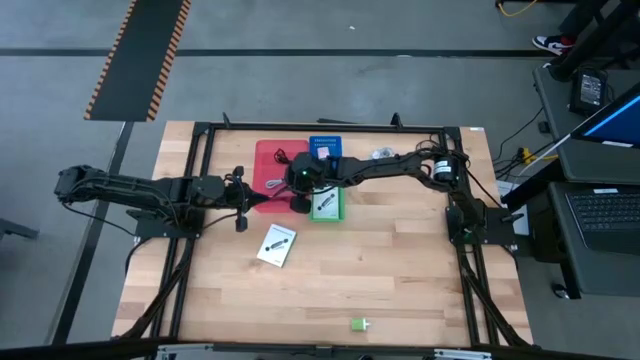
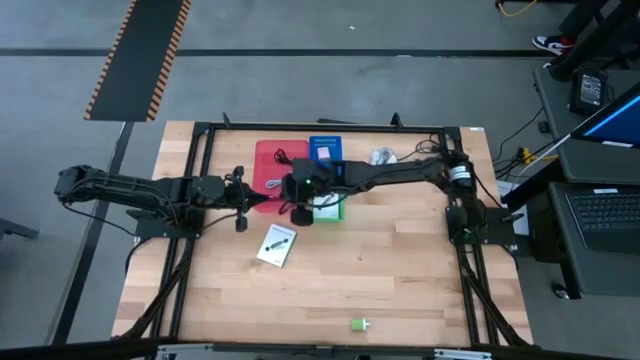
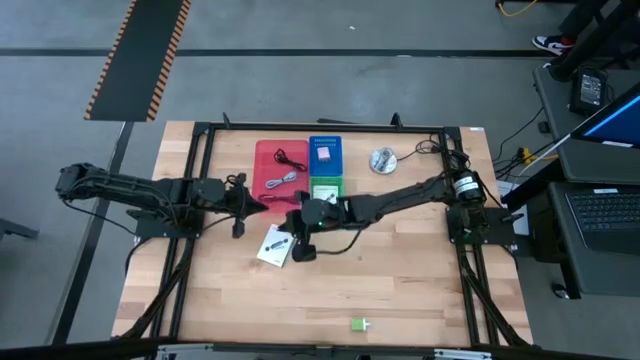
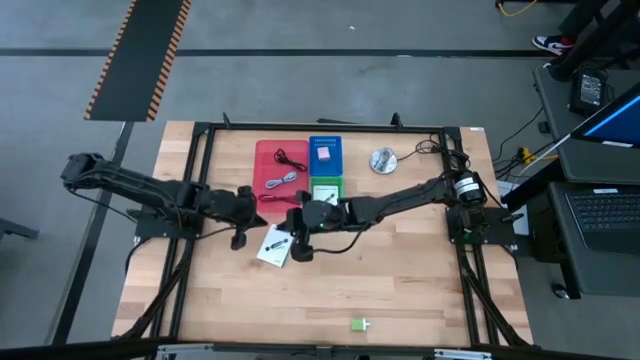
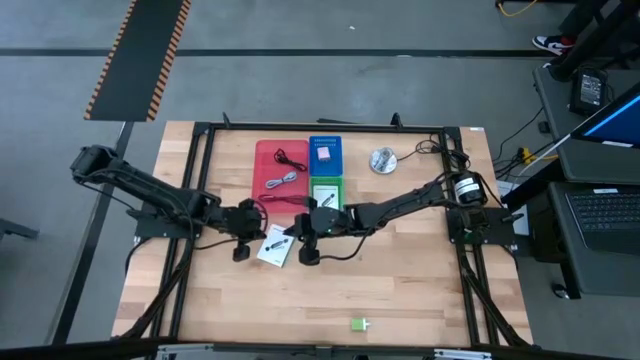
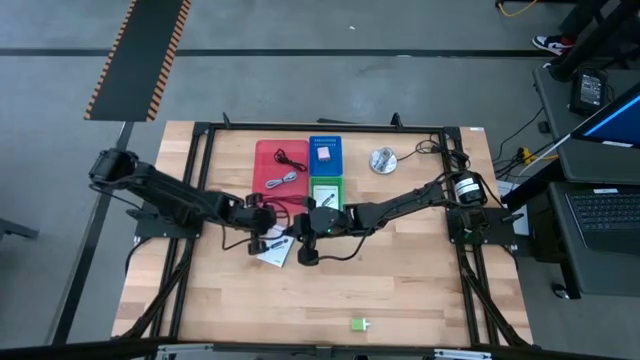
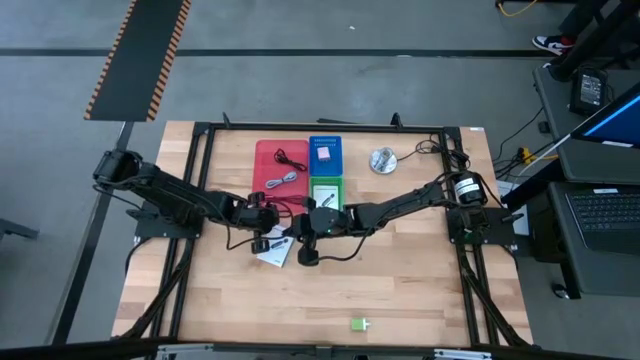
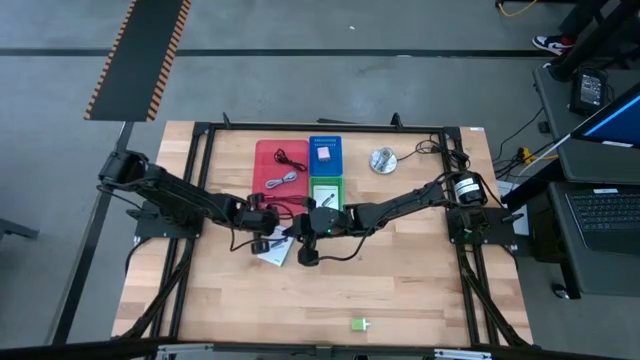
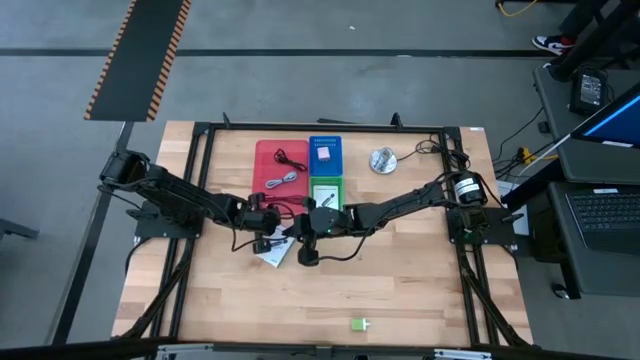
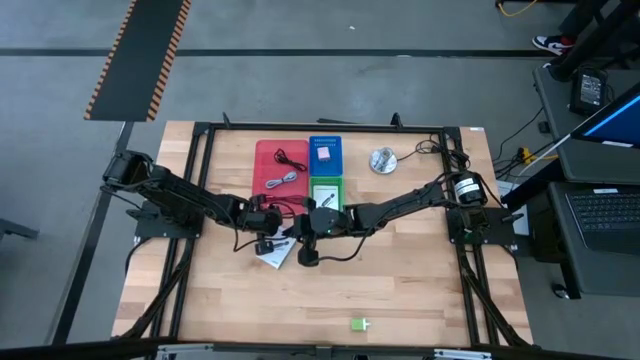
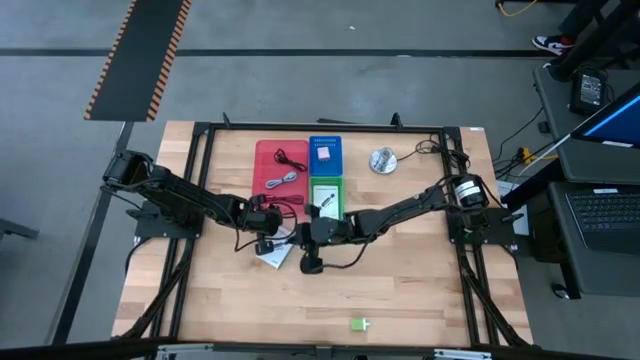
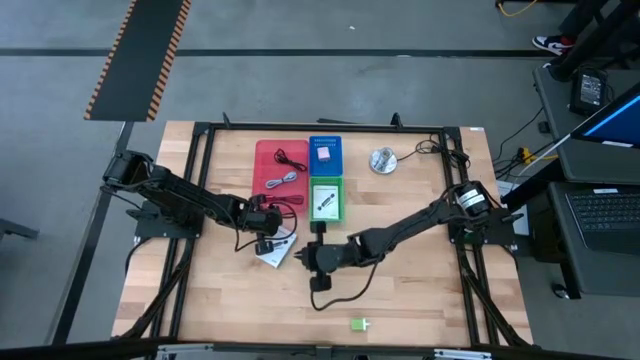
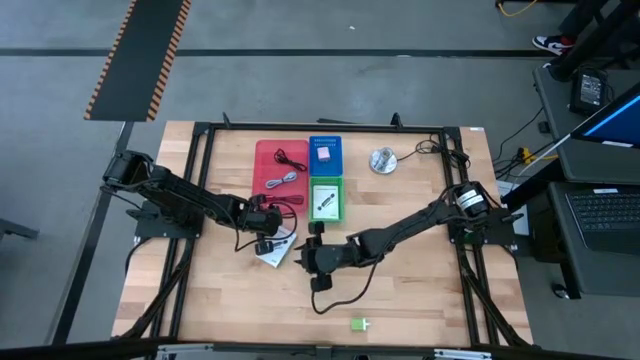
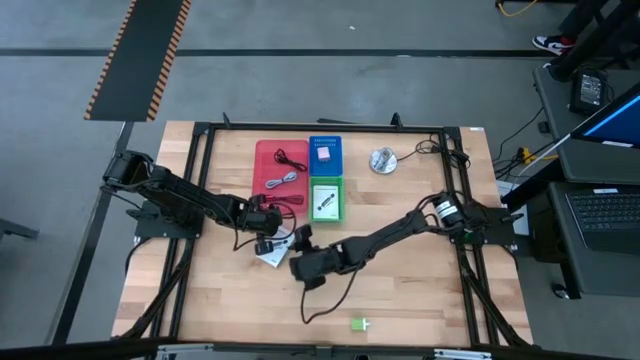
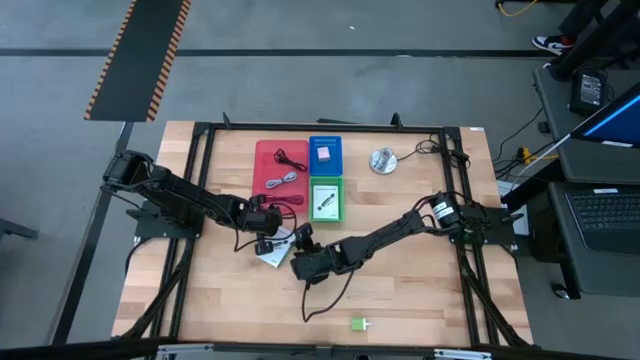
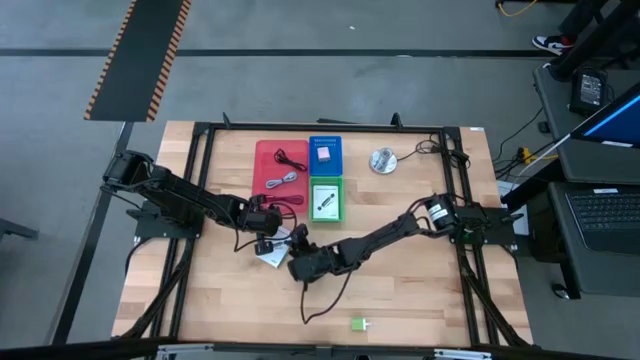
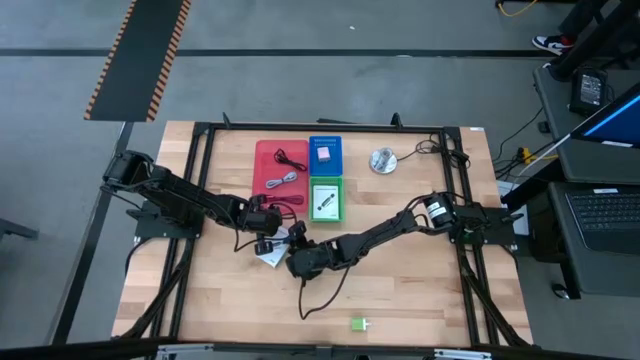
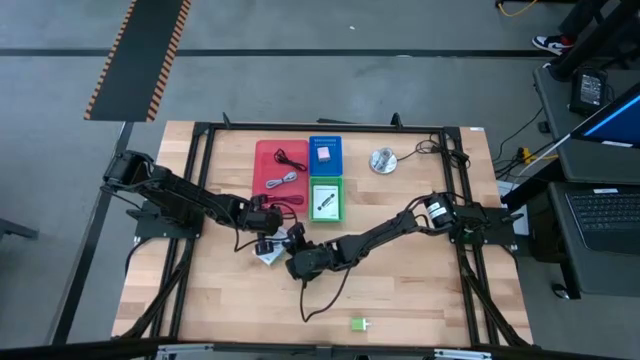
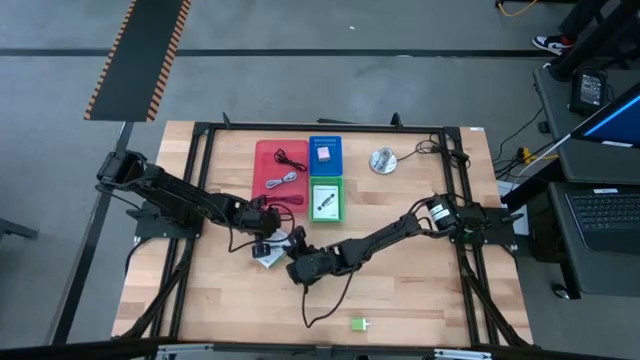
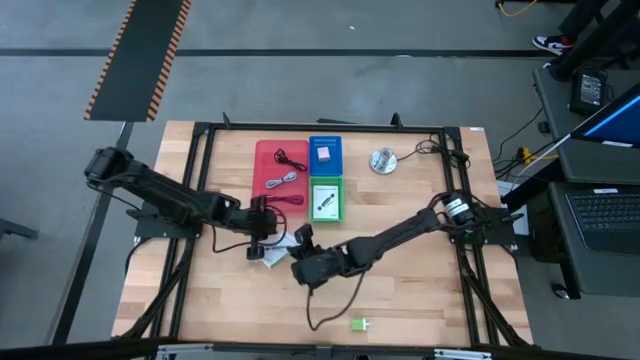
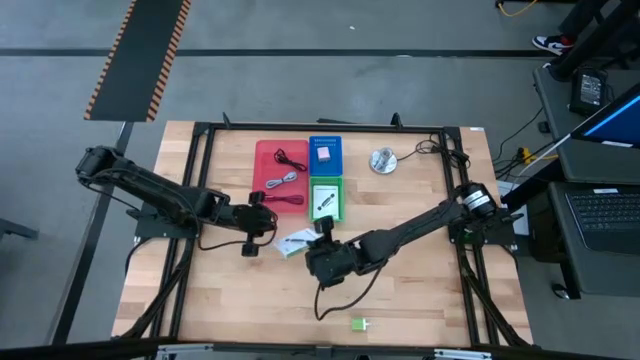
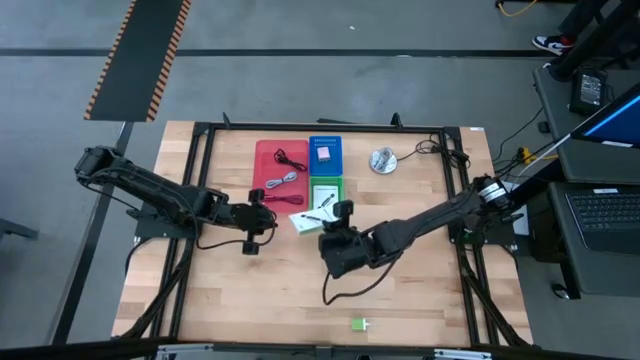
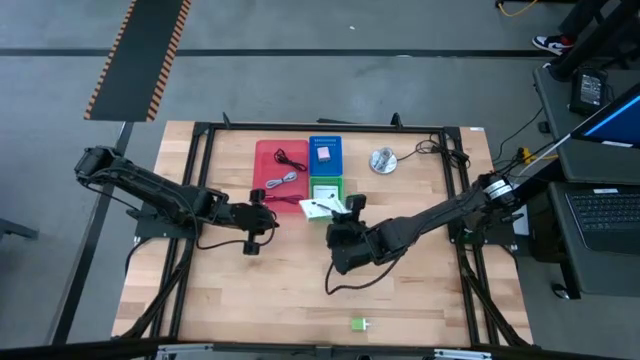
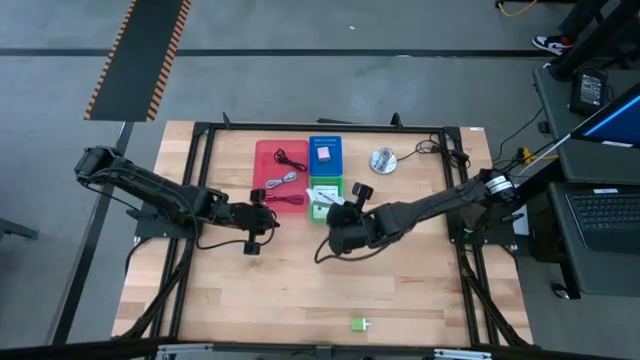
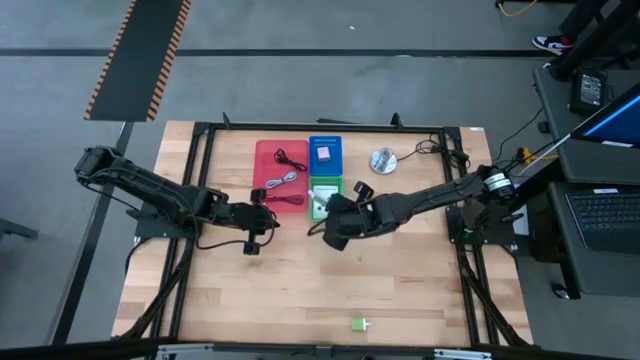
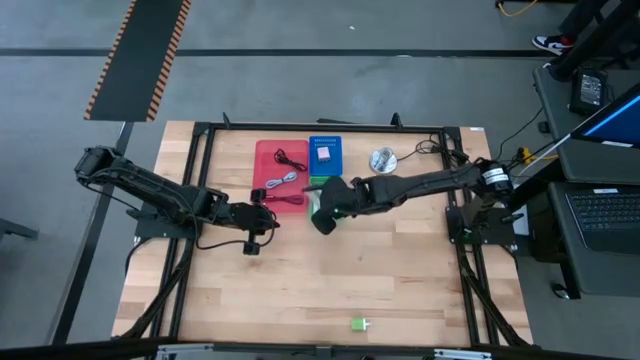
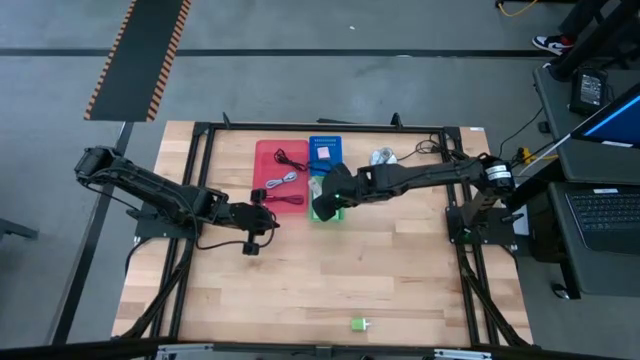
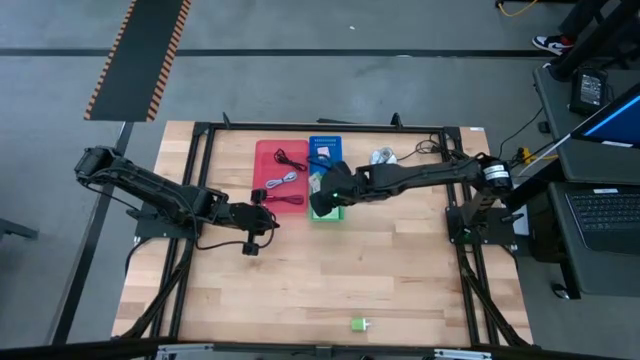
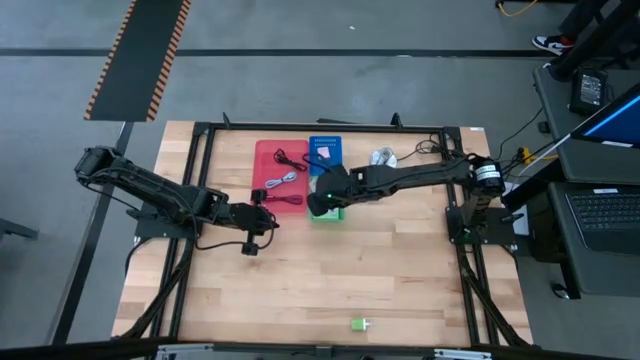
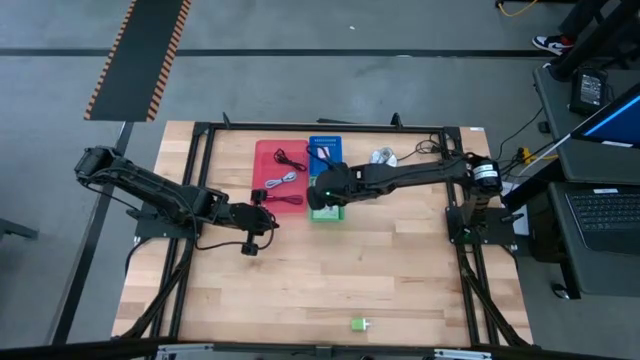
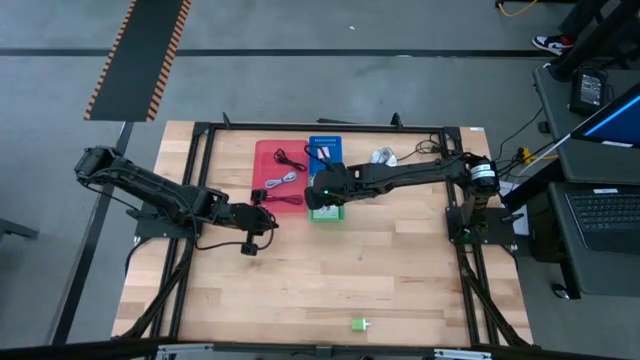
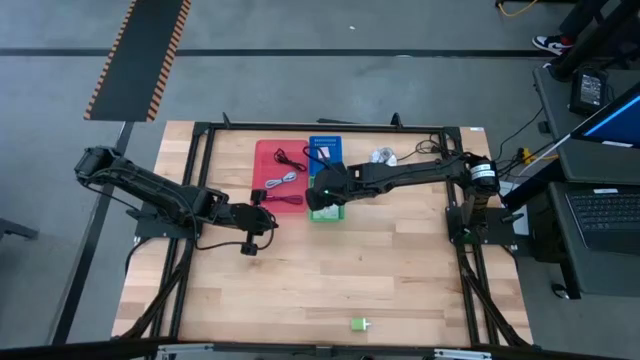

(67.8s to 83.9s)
Task: Pick and place items into bin
Put the white card reader box into the green bin

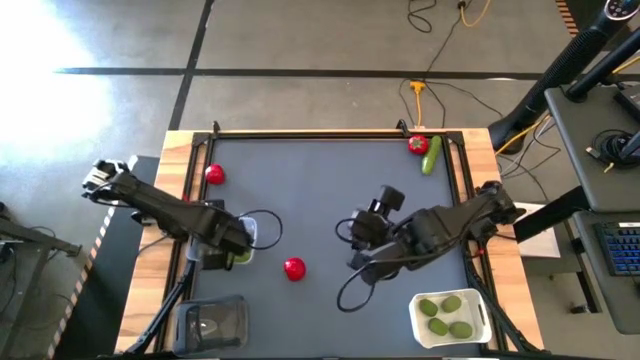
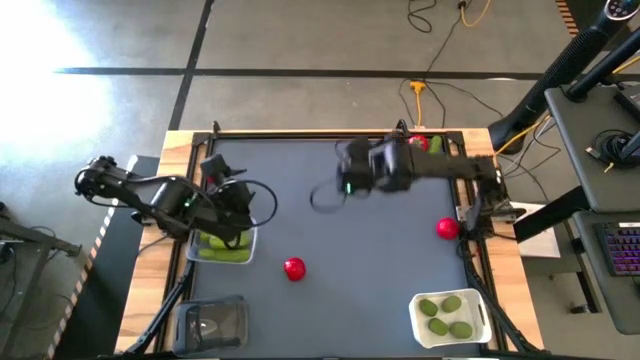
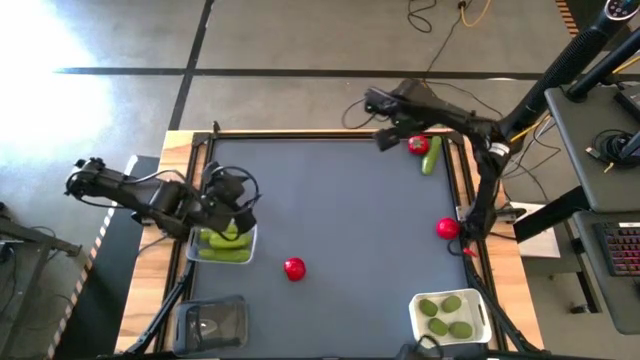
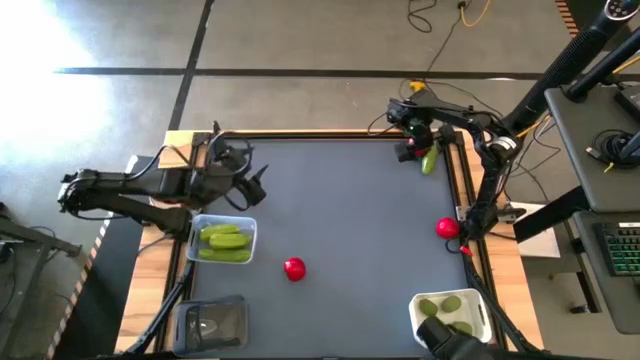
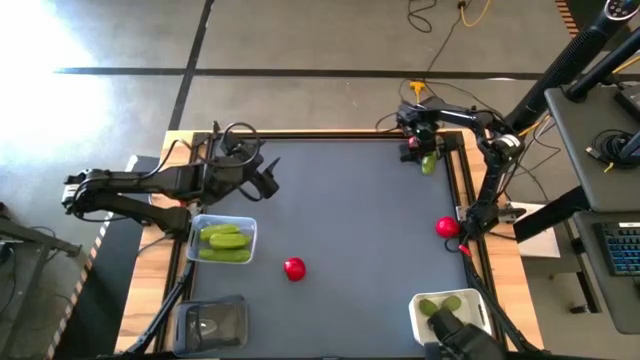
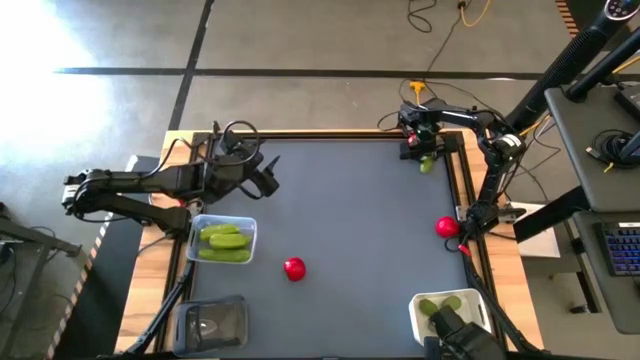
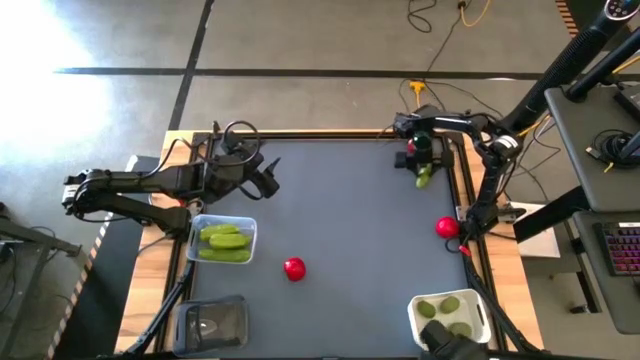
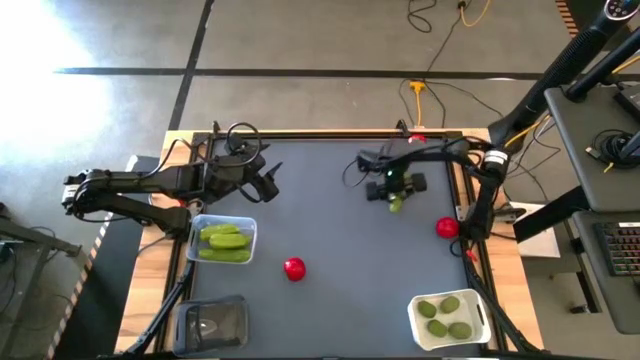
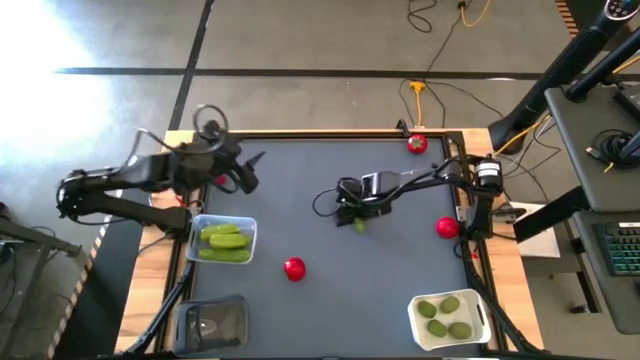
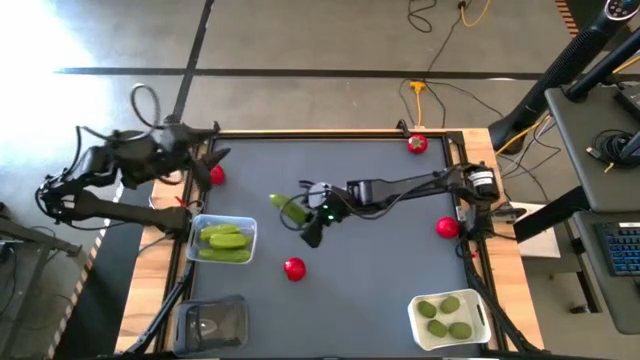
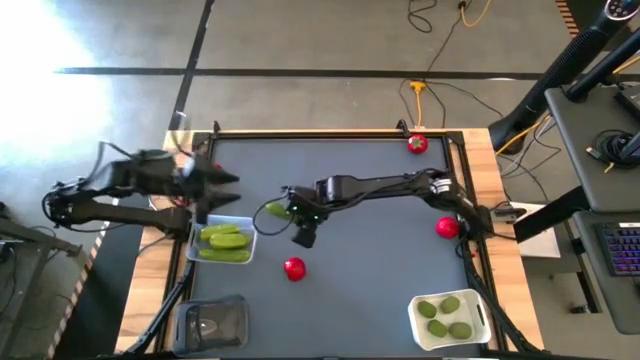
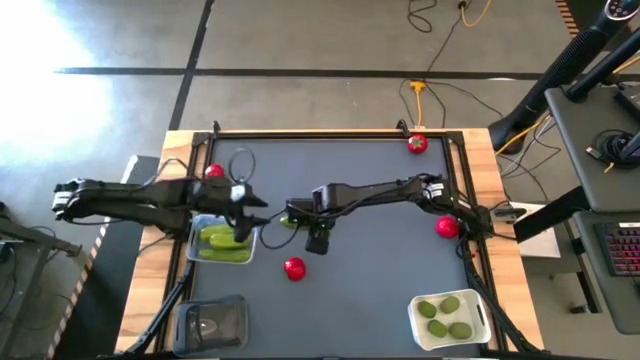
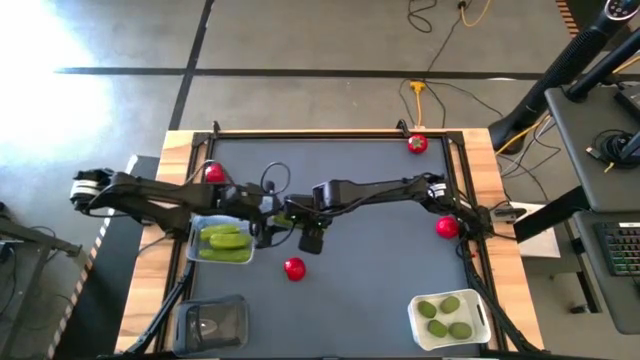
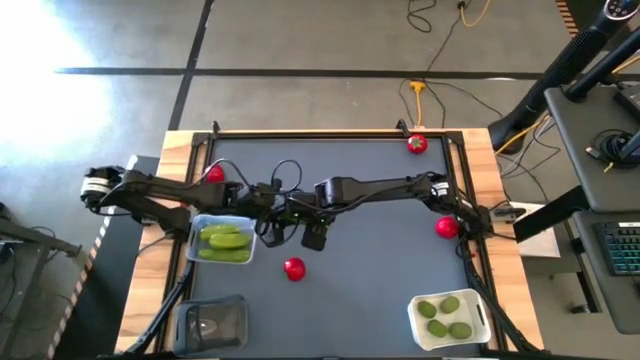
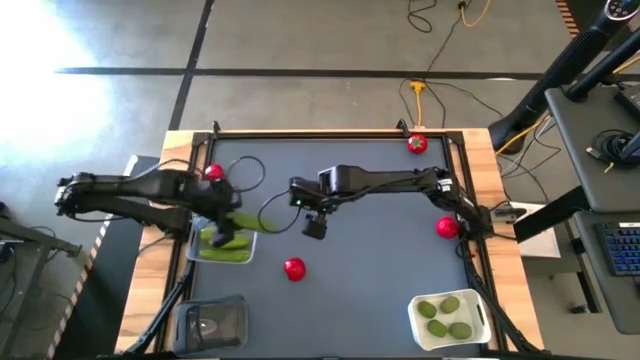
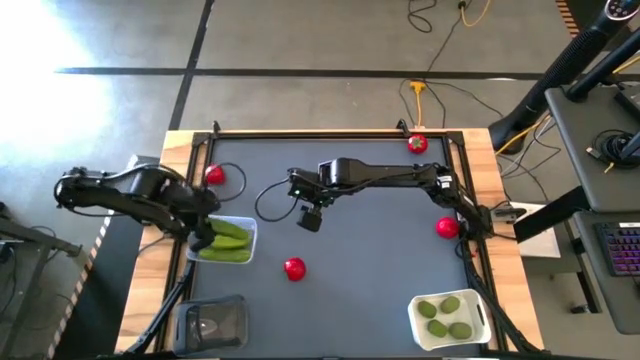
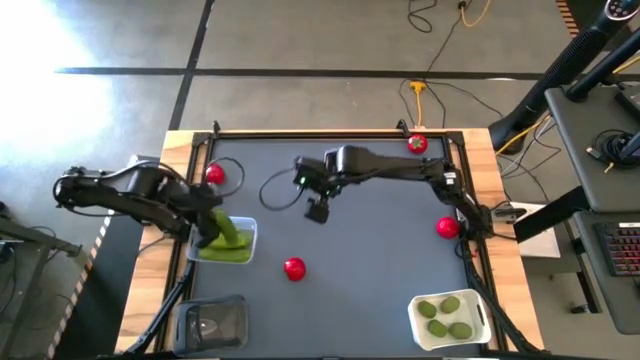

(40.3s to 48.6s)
Task: Sort produce into baskets
Put the cucumber into the transparent bin
